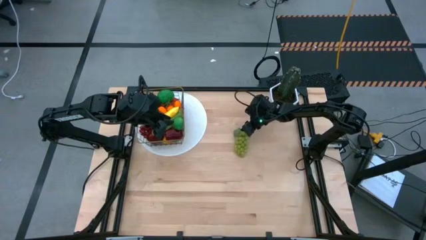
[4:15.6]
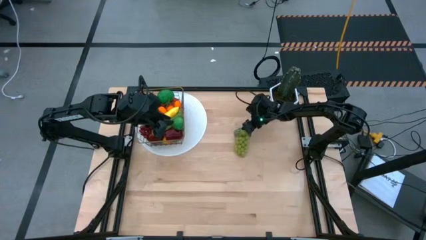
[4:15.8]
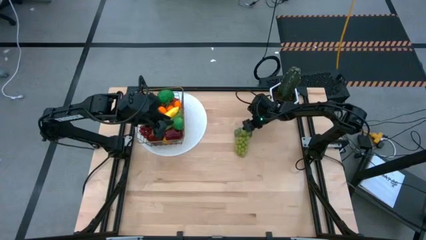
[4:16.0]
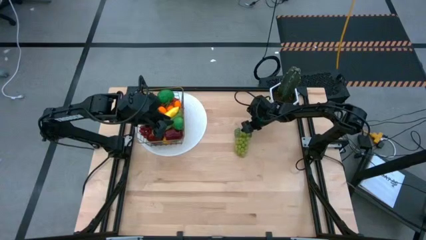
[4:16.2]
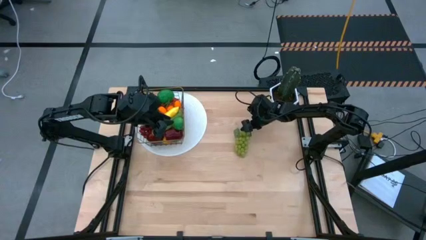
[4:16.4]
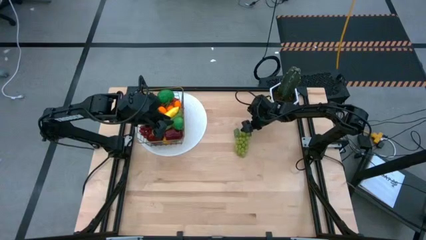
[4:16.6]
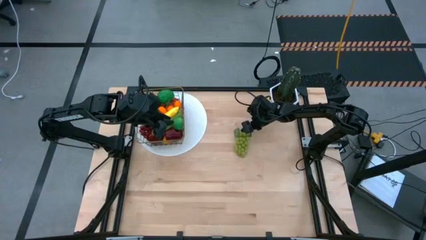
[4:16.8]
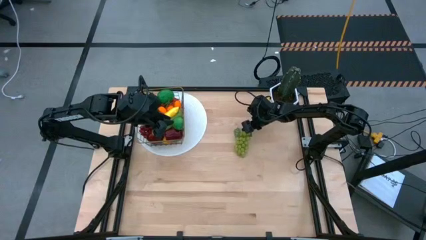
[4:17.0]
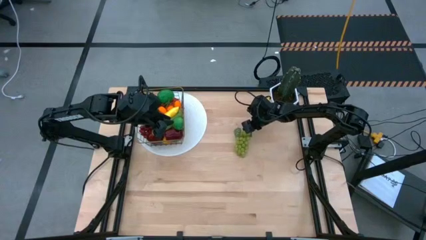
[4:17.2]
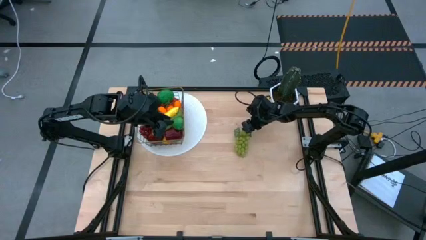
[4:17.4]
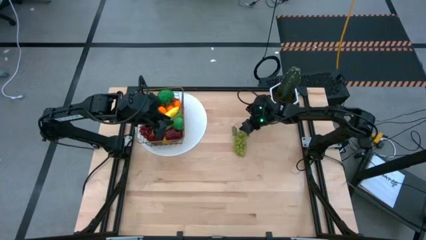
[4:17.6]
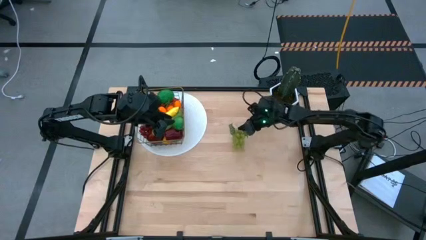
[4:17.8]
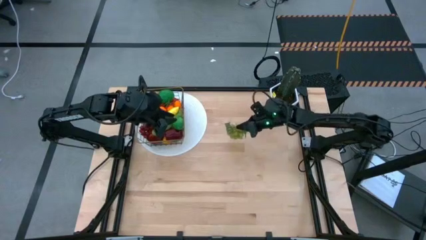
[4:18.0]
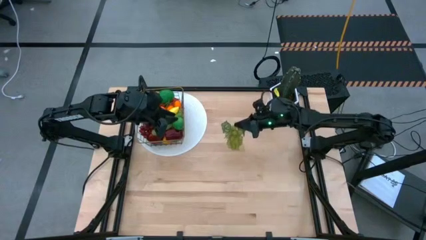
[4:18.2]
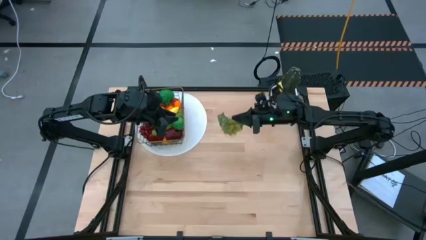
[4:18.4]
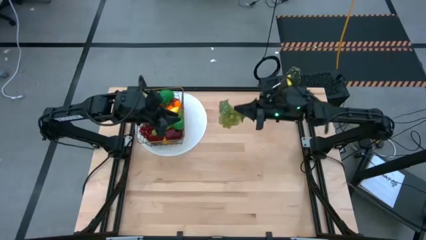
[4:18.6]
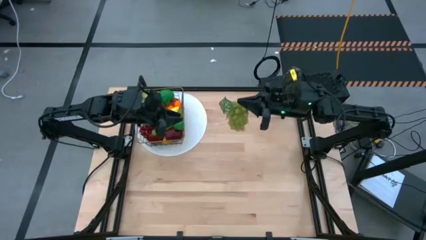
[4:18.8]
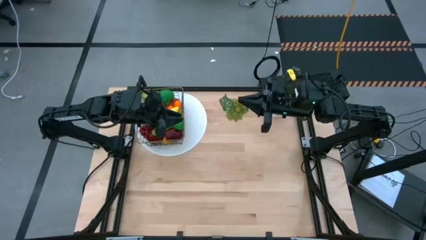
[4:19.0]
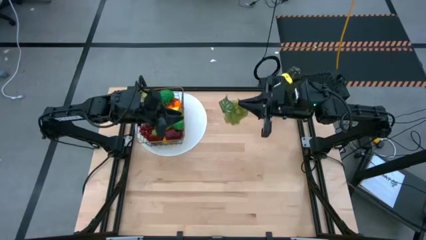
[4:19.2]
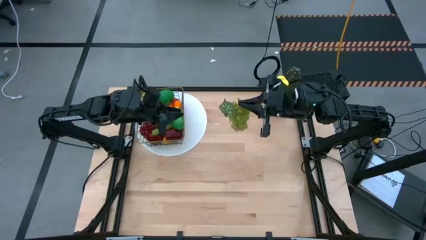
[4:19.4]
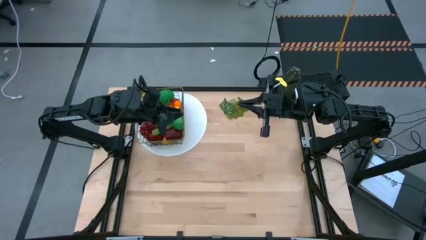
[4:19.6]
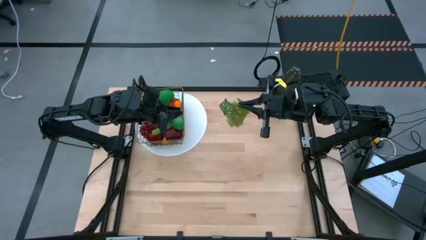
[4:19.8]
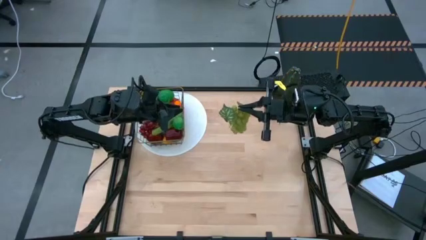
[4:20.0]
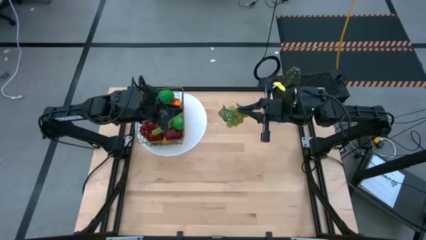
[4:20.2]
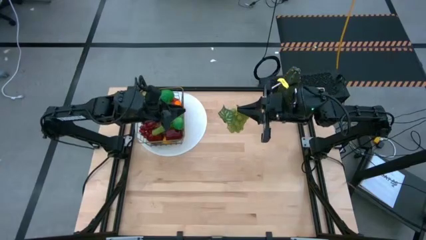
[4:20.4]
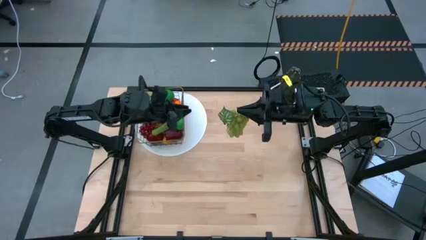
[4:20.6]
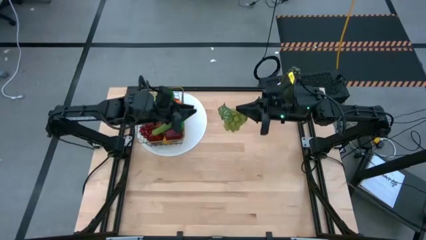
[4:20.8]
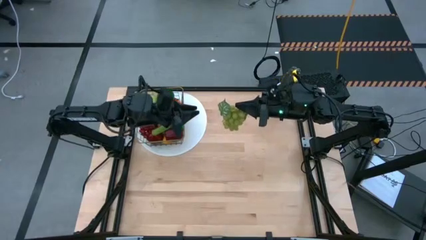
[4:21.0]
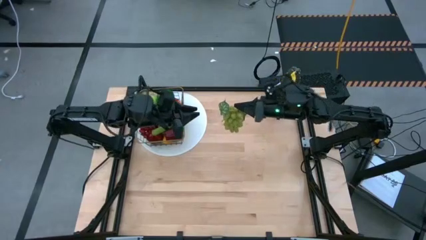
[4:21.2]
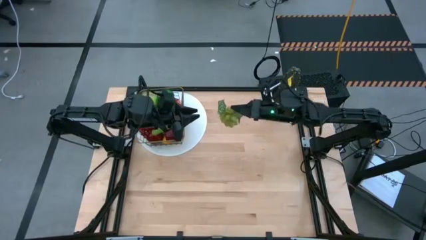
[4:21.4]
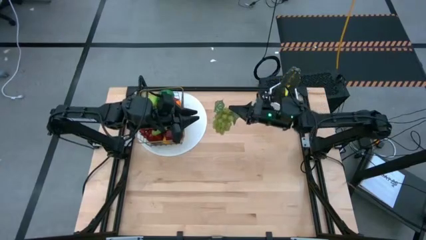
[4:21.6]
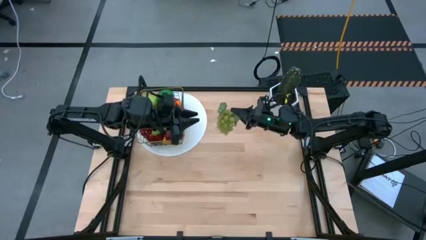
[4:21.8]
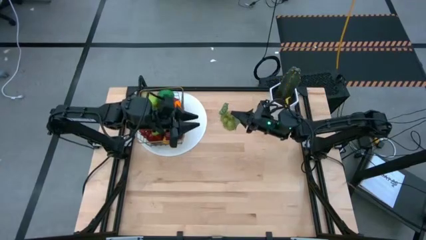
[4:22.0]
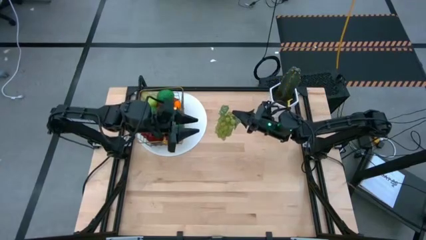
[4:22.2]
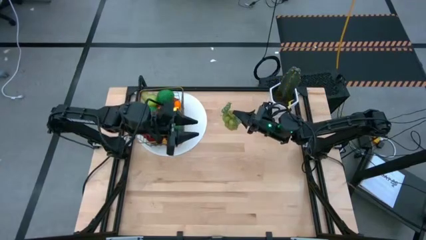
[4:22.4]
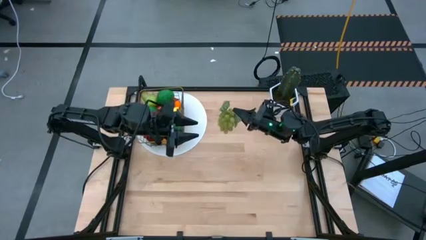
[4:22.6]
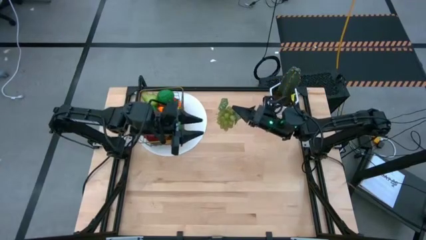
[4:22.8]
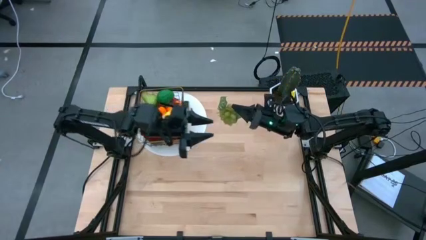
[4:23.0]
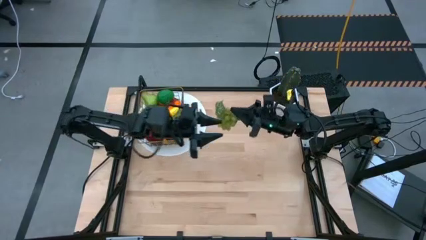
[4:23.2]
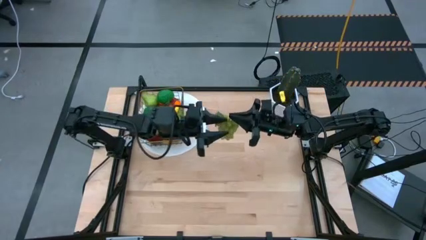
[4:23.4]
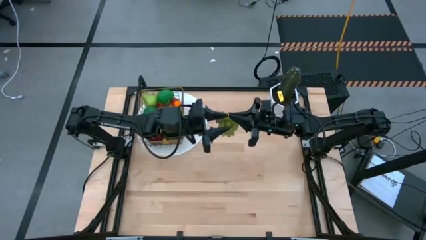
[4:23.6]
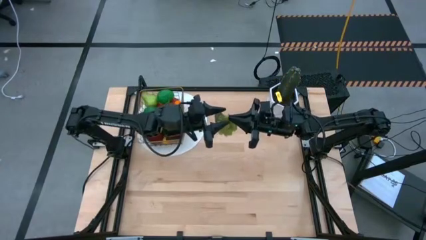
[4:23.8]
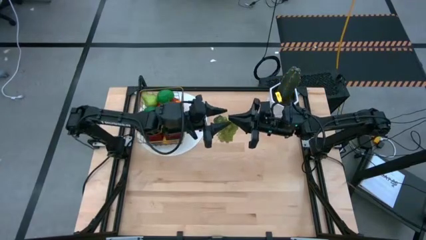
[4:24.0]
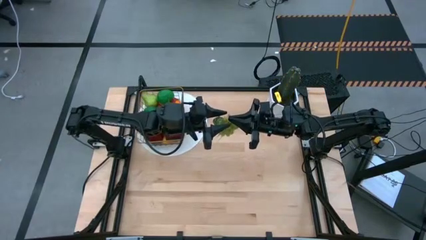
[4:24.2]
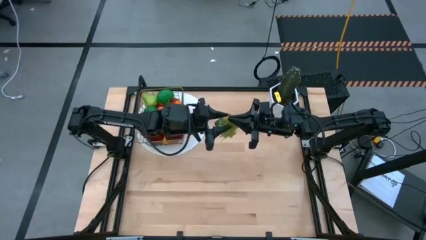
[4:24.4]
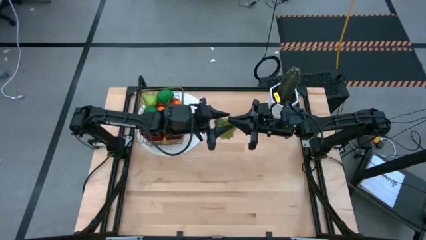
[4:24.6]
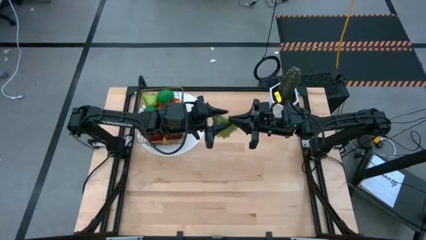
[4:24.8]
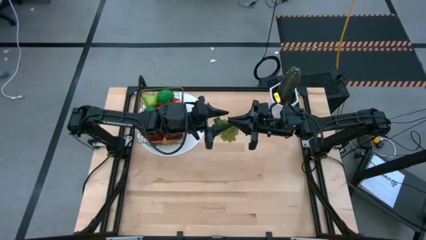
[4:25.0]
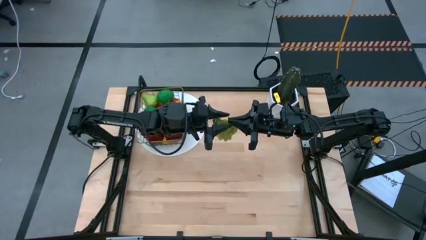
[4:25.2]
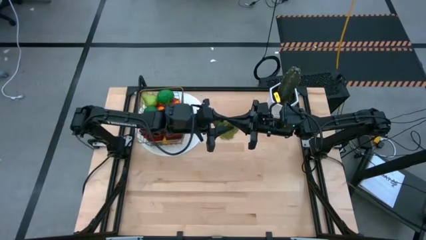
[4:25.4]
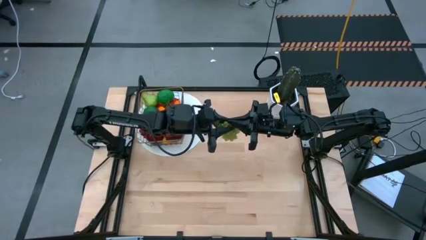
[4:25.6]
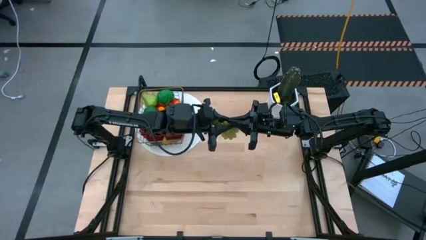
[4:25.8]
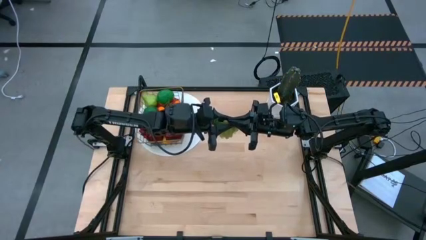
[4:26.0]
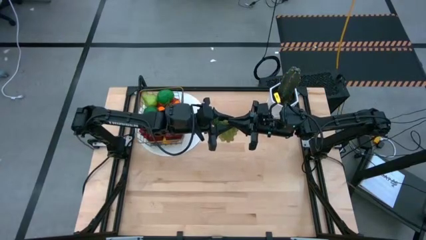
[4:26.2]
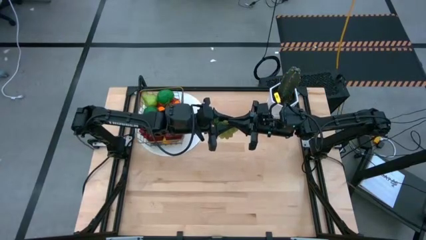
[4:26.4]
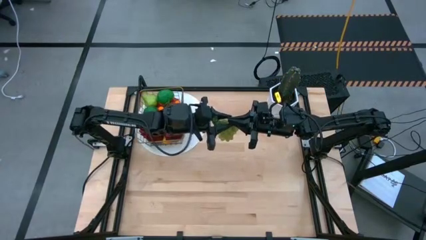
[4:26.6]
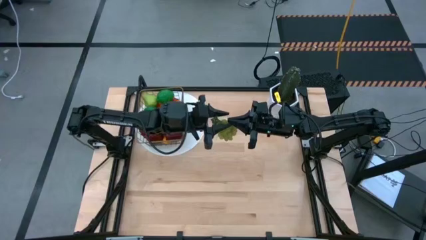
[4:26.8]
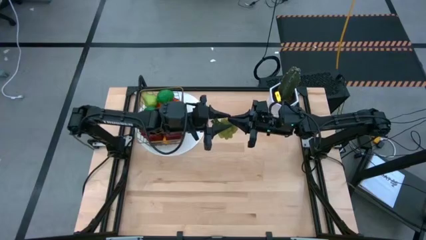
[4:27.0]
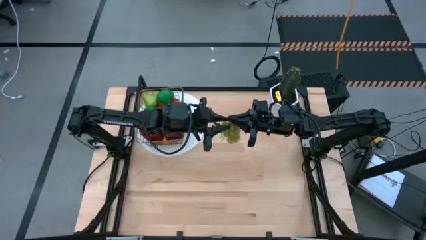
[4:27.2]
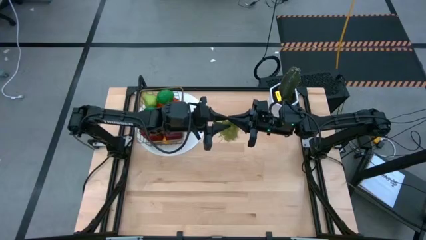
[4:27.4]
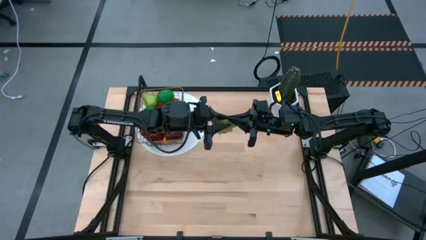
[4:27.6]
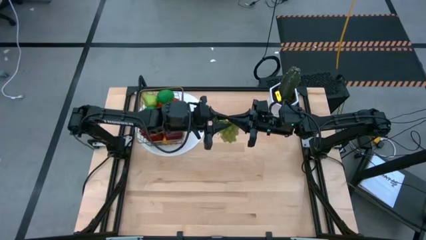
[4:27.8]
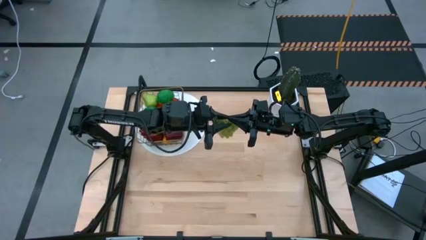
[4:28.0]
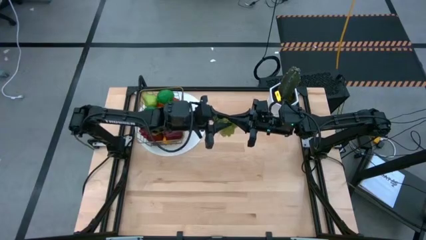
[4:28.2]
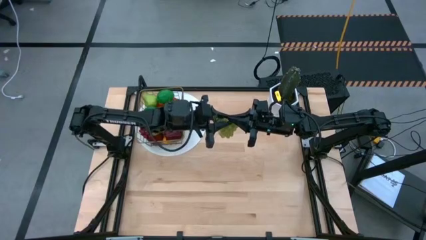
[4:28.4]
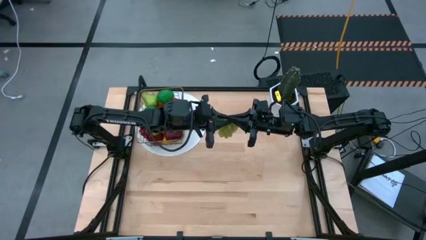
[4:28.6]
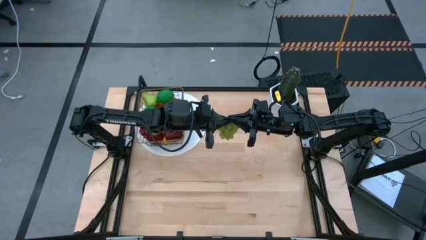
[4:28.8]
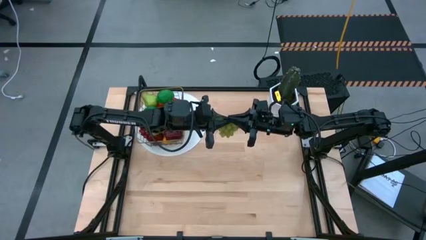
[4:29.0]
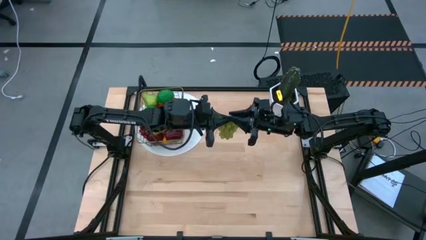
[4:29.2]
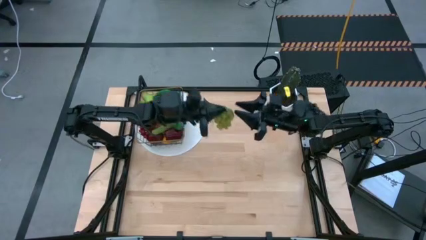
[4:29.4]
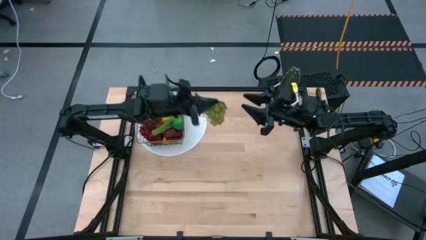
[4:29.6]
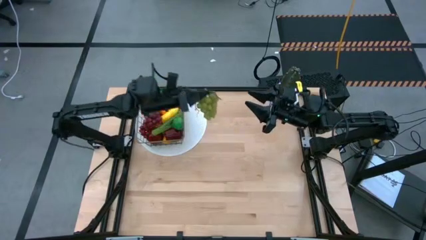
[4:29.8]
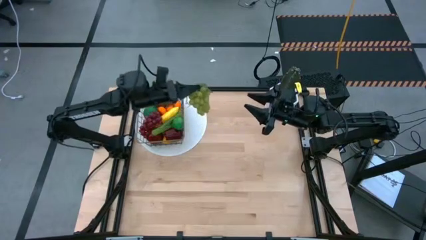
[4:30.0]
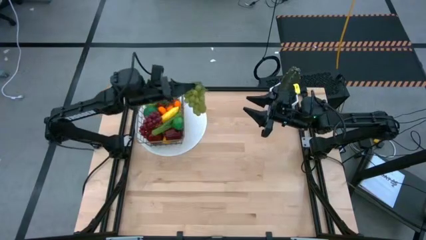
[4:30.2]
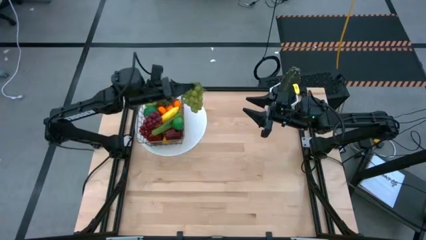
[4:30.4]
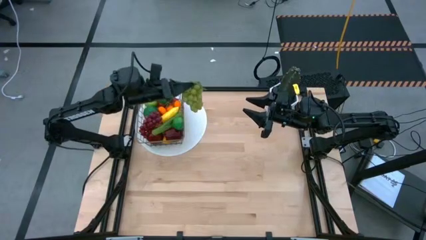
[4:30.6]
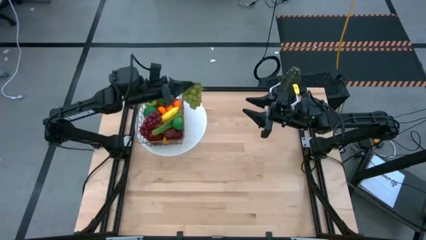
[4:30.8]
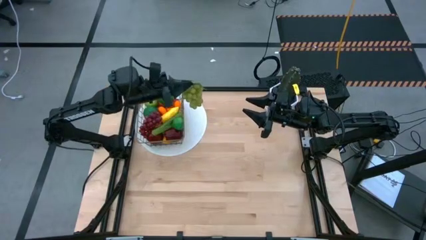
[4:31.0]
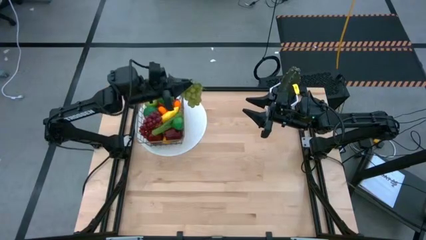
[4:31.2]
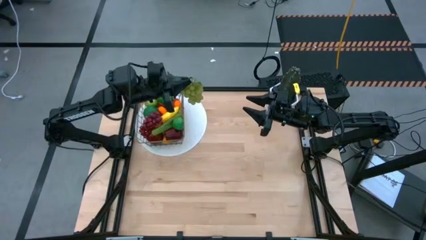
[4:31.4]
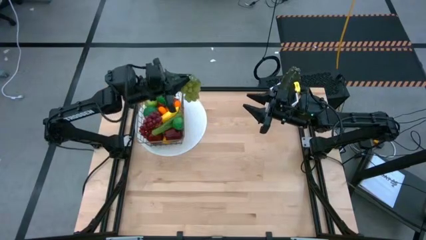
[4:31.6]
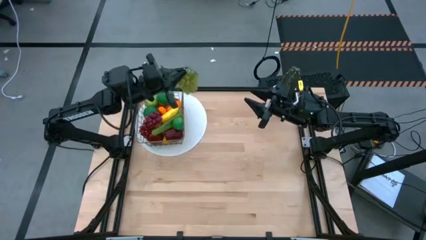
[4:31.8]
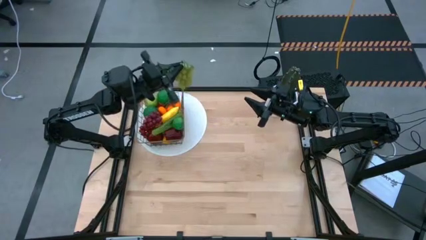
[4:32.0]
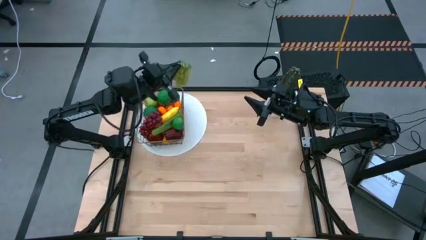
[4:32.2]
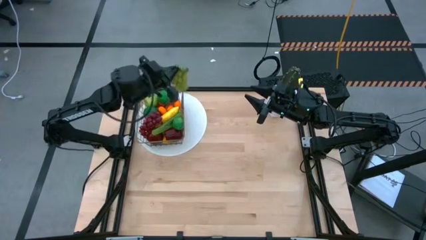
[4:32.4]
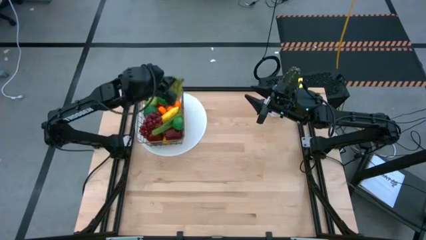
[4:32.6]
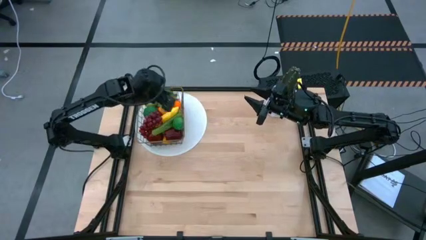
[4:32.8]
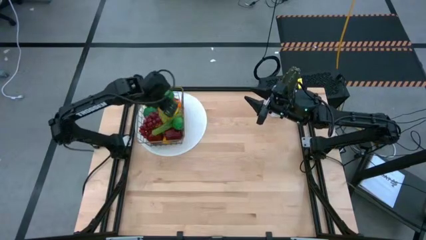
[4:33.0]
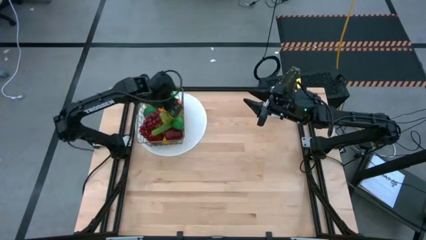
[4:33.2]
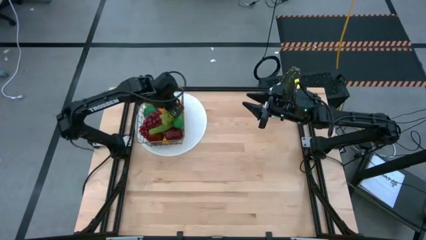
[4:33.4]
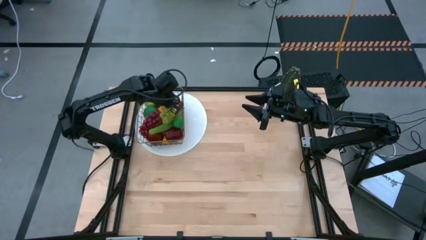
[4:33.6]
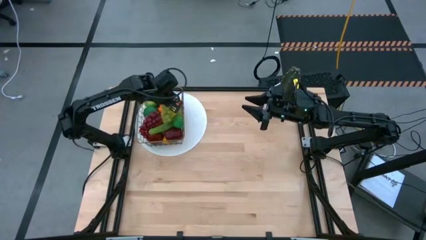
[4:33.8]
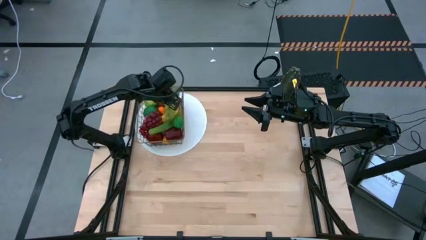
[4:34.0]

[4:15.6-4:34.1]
Task: Build produce basket
Put the green grapes into the wire basket
